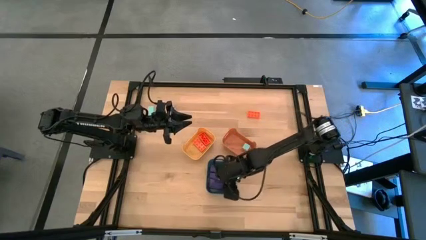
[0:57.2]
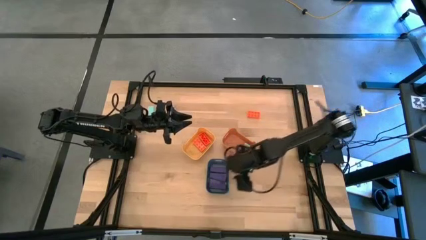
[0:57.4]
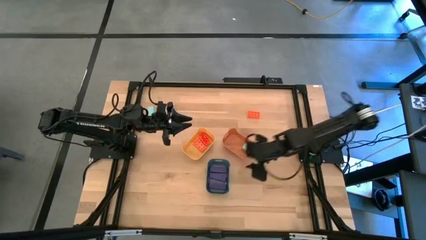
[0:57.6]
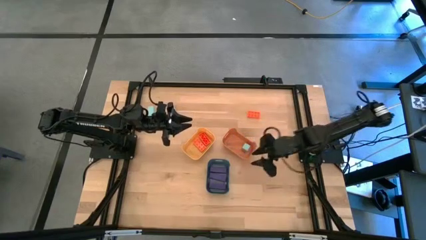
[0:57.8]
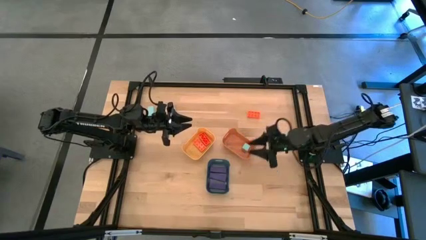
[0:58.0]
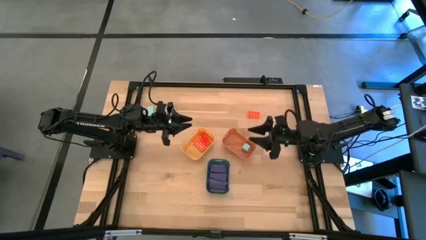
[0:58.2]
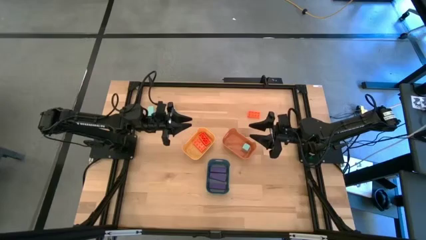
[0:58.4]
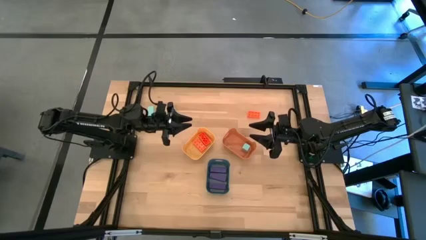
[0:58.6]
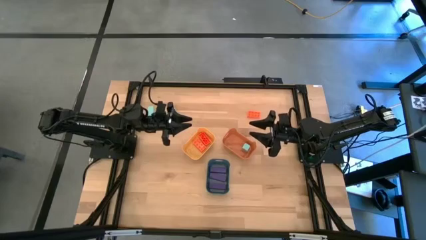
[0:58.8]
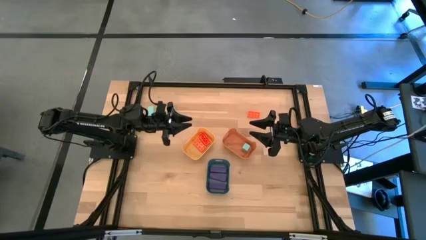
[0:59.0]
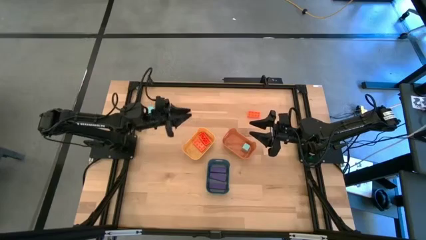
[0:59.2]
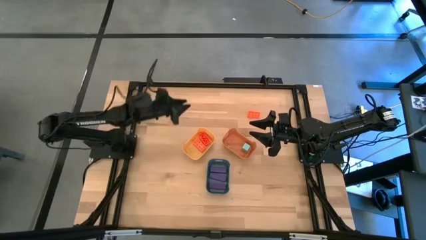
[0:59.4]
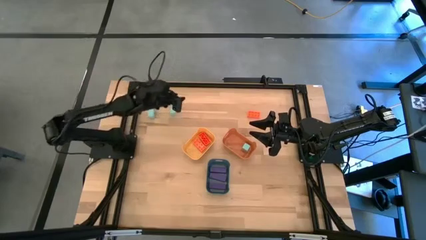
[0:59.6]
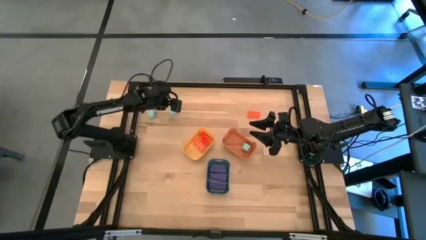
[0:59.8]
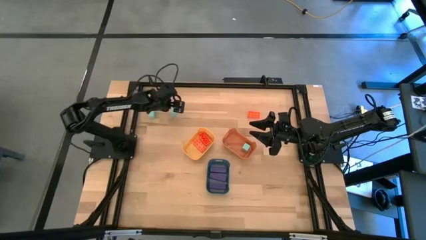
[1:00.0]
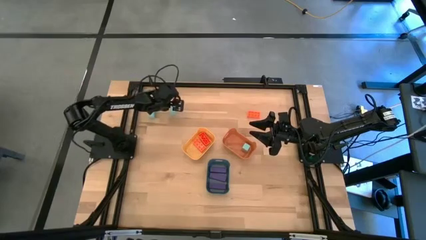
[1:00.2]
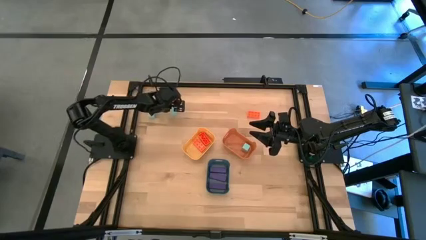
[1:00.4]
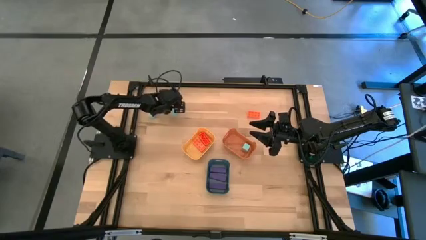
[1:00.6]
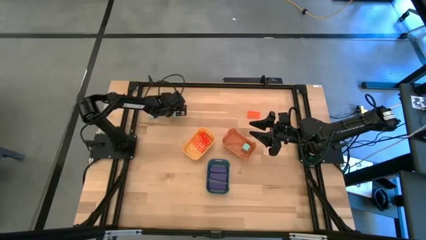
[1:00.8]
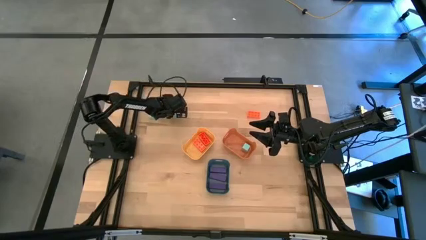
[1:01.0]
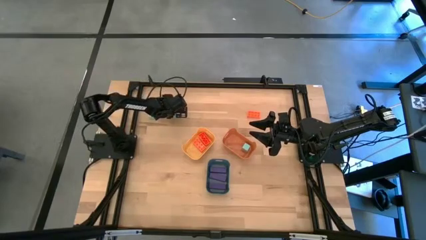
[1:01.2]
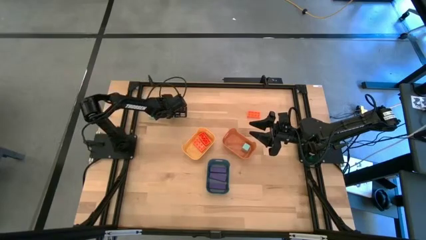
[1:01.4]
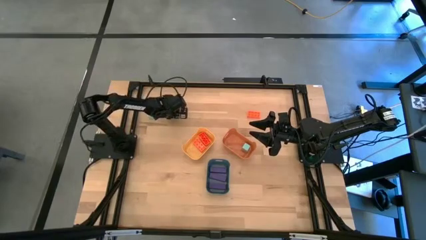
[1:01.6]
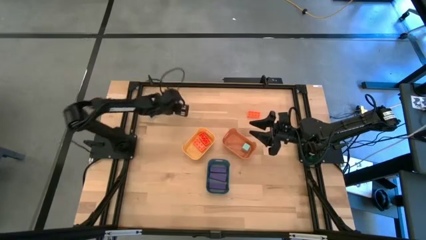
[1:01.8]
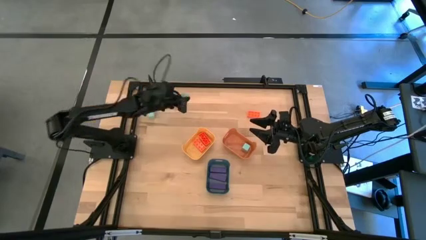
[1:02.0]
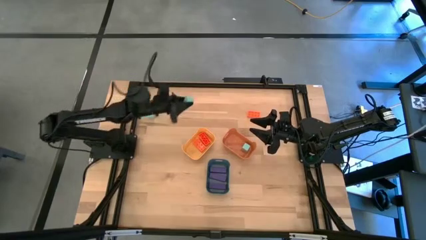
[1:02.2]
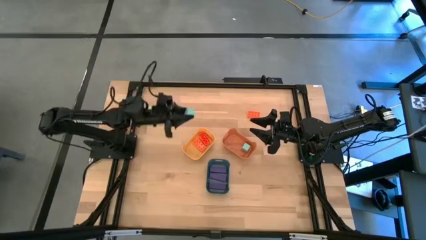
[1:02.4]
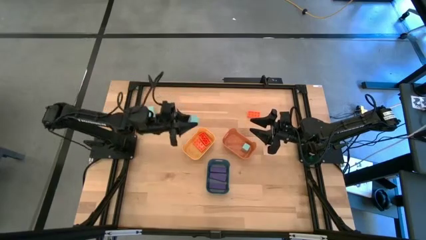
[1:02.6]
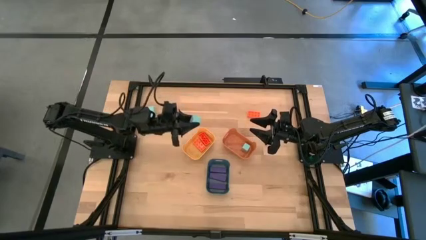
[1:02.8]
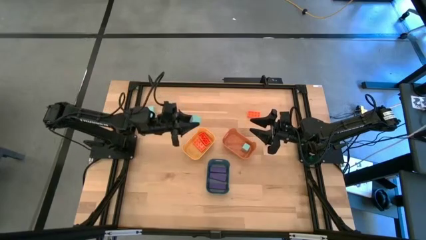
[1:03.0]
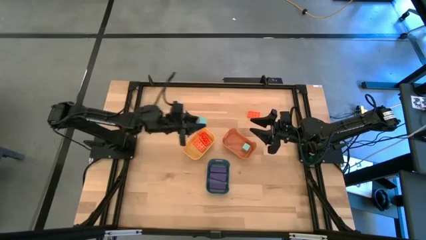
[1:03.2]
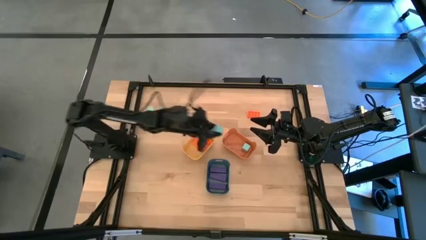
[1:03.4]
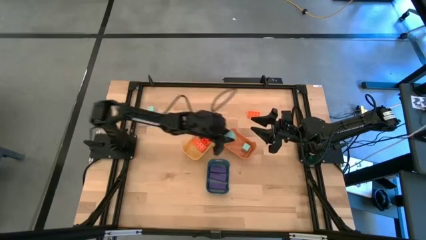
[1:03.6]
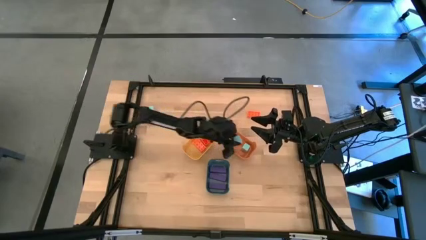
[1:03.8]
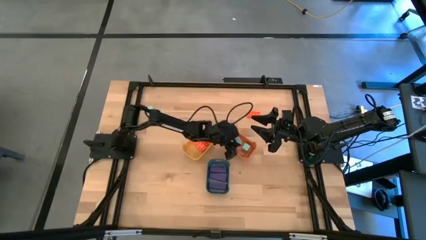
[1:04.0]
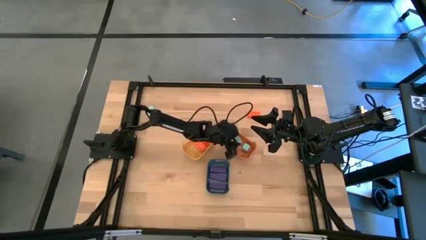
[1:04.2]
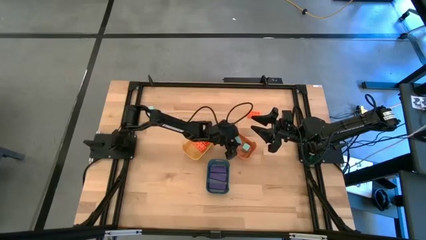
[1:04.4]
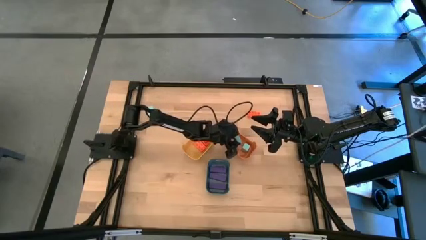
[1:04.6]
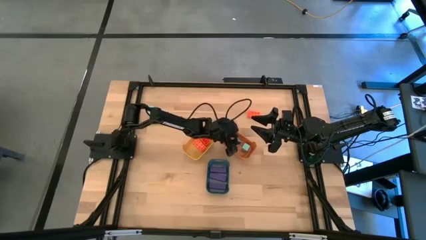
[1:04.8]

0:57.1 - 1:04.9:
Task: Sort & place blocks by color
Put the right blue block into the orange bin

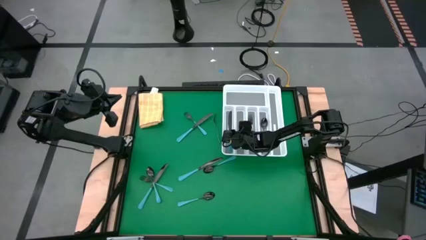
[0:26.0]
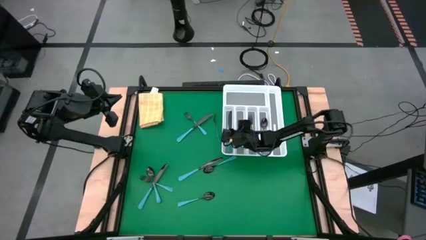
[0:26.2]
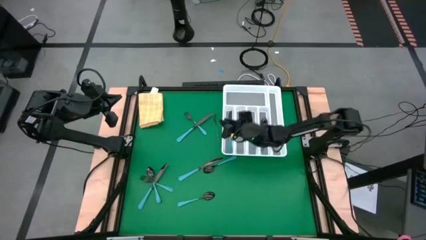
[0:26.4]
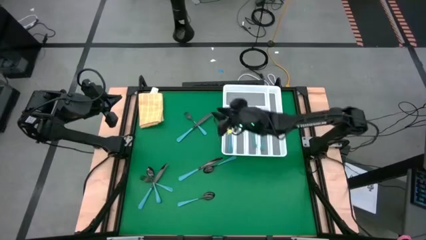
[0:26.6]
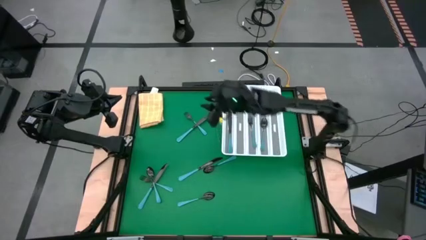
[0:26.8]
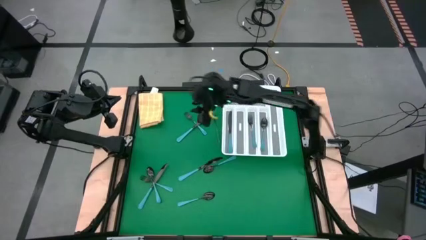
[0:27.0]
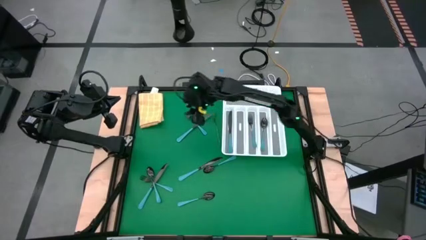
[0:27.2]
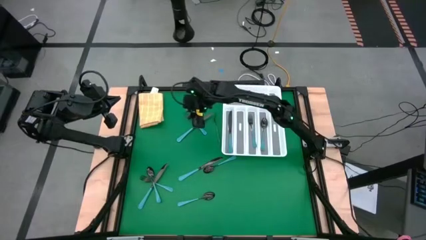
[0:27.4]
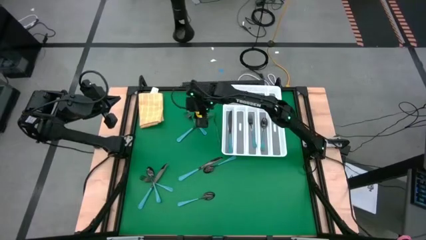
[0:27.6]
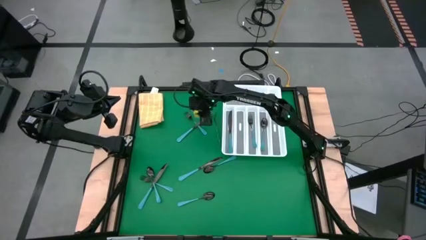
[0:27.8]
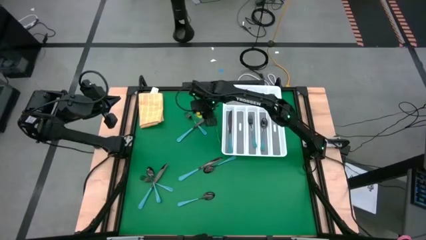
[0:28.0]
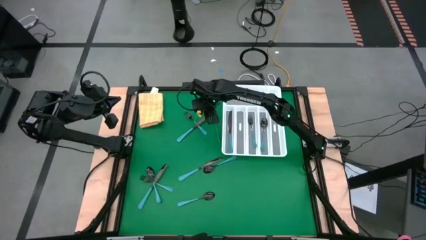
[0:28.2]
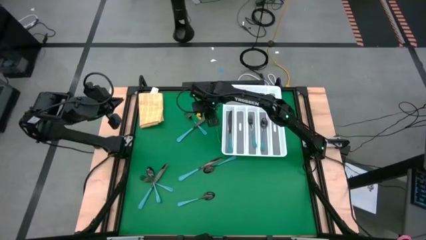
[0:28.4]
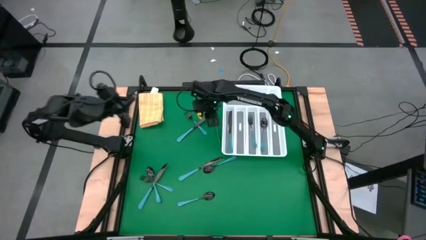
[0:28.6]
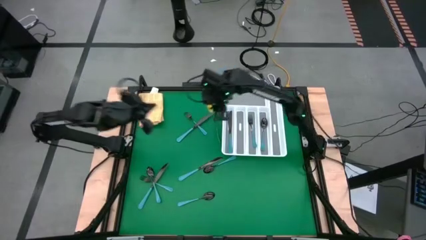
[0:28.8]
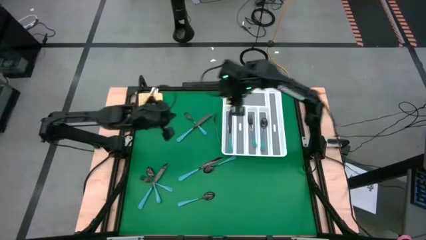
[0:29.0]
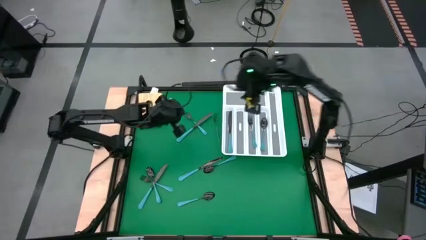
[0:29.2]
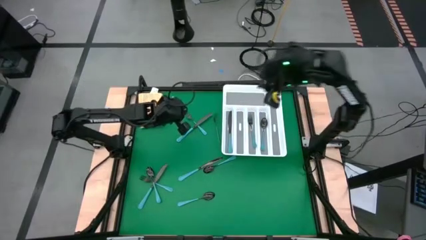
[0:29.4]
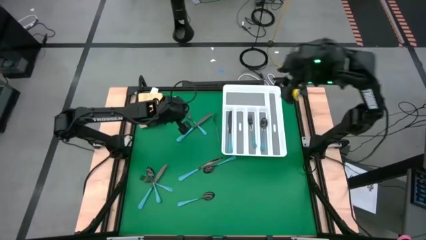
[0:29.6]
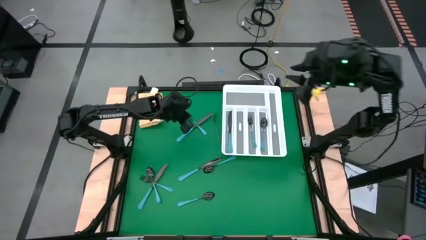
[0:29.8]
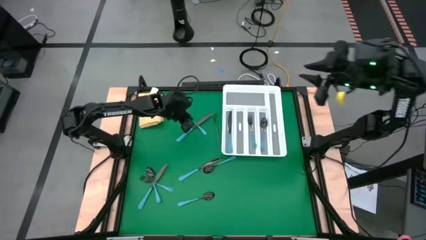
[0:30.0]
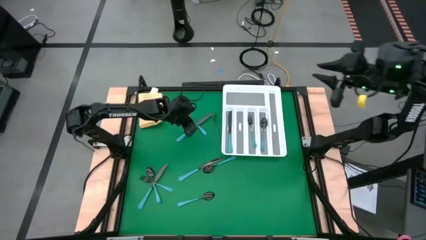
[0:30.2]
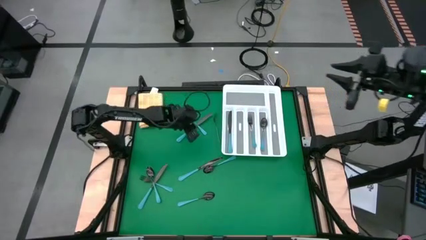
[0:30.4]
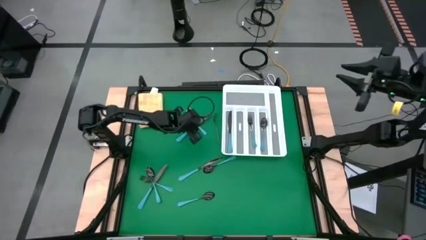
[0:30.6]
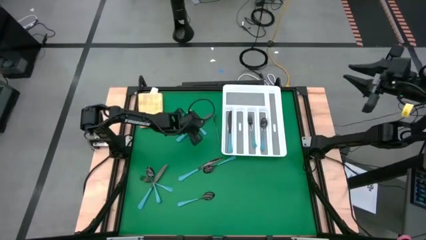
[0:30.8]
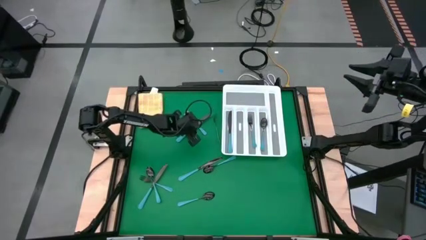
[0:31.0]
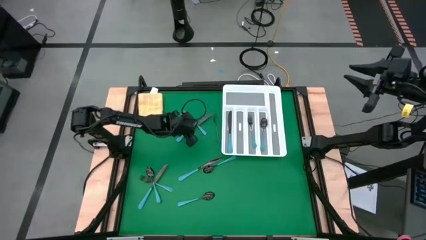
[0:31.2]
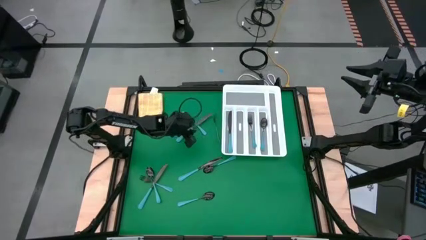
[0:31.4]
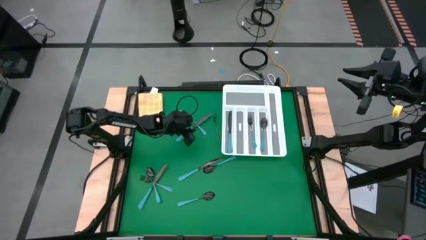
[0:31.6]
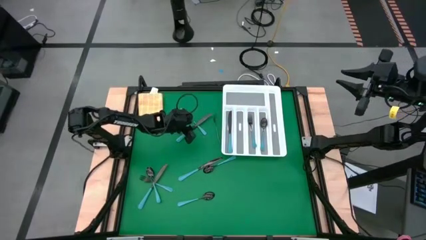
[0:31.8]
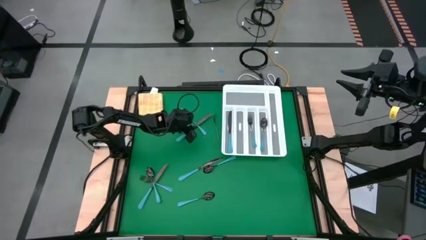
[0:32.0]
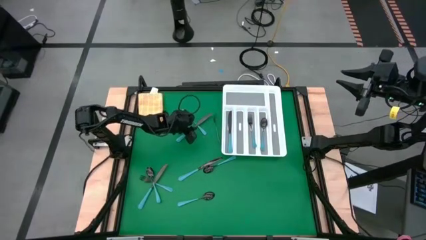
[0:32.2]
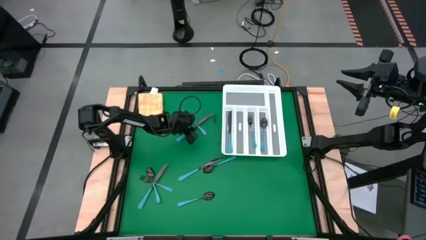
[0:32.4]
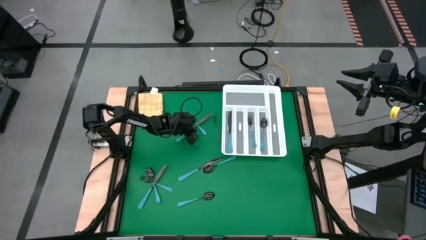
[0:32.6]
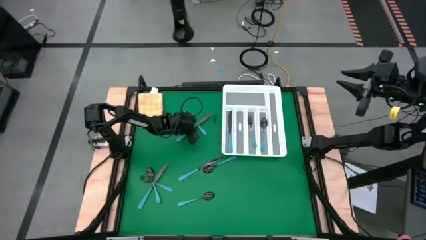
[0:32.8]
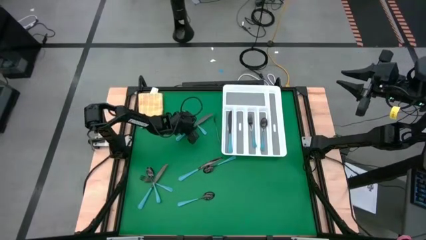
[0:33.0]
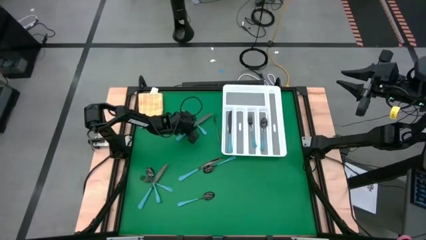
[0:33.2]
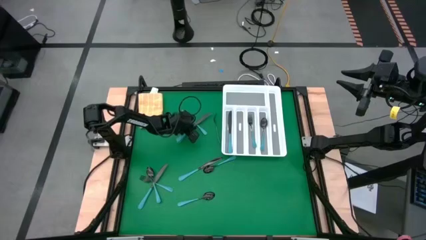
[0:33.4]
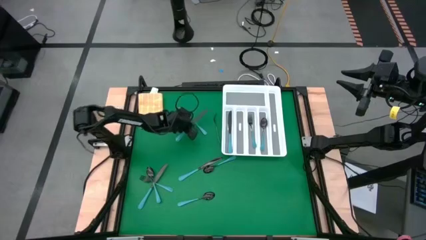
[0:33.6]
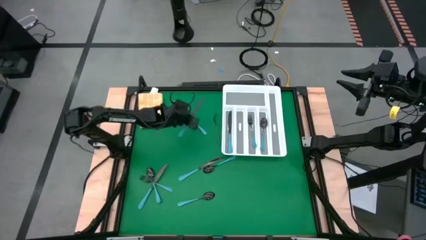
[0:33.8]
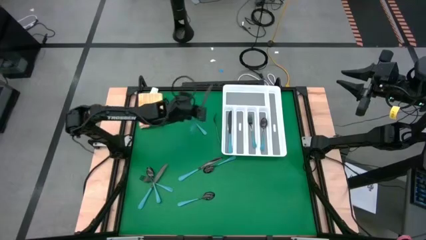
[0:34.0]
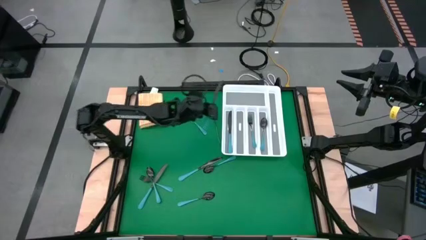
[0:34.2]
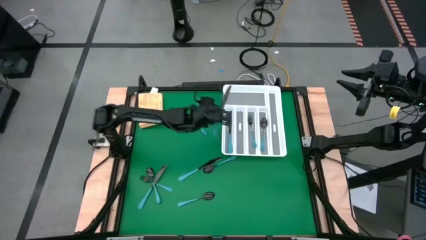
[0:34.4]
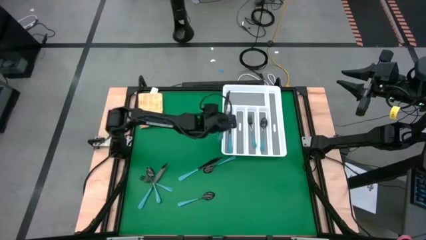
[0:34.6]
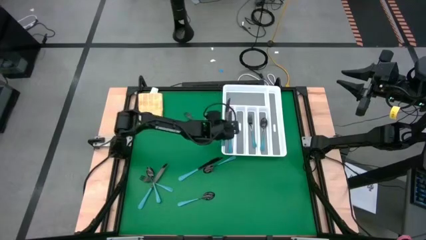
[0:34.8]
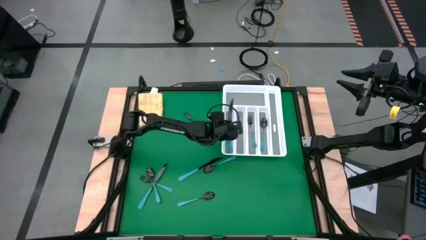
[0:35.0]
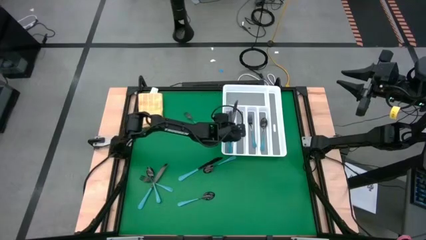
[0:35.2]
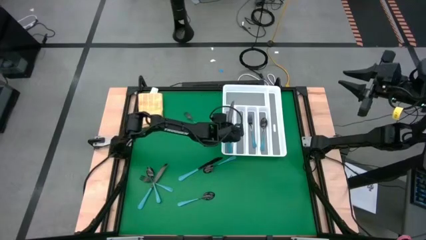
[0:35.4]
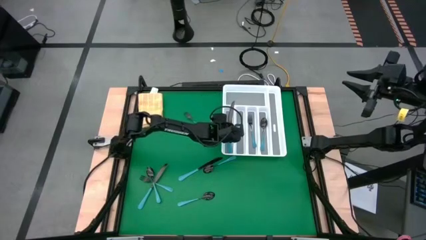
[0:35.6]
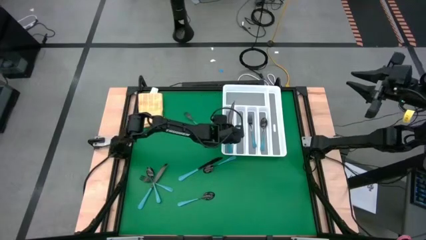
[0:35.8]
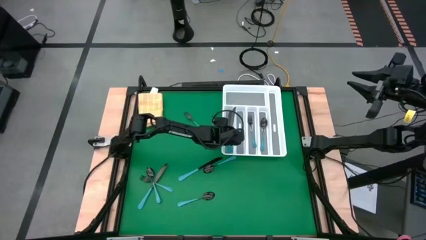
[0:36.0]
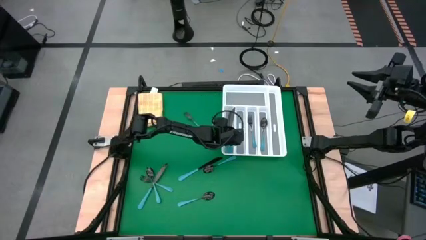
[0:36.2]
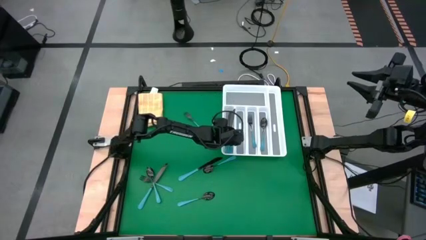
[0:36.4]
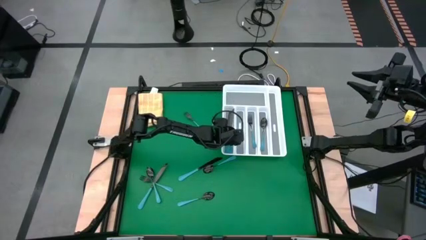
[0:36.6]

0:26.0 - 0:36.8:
Task: Sort silverware
Put the blue knife into the white cutlery tray
